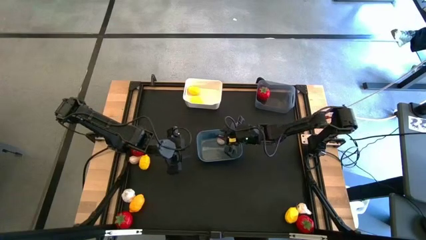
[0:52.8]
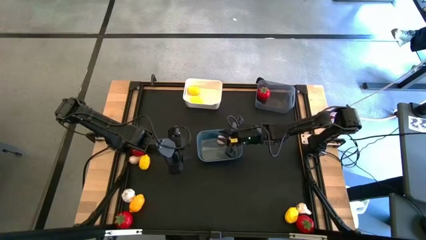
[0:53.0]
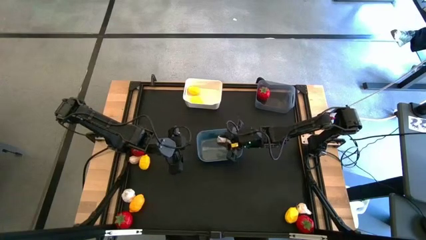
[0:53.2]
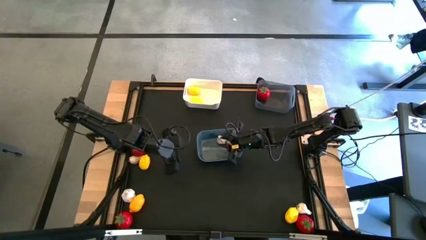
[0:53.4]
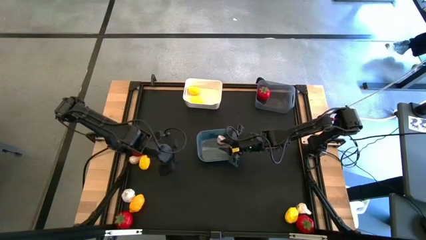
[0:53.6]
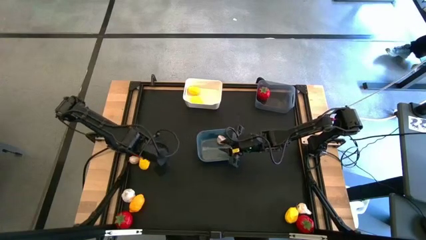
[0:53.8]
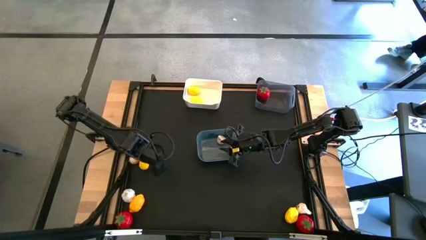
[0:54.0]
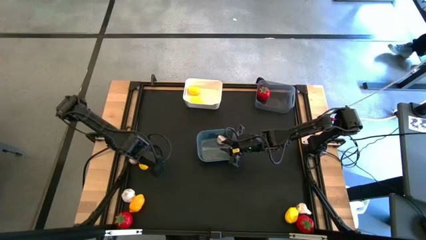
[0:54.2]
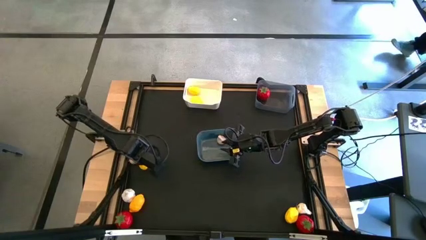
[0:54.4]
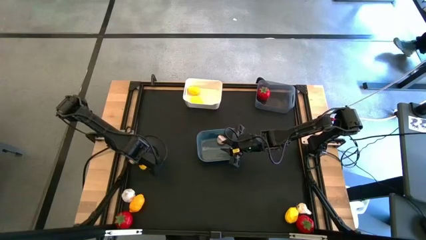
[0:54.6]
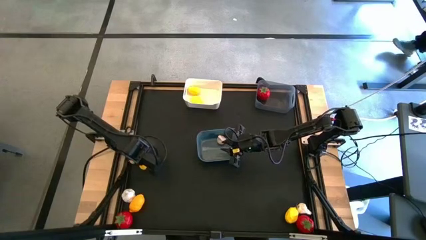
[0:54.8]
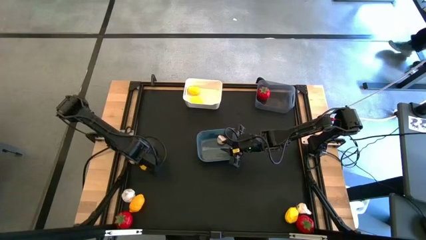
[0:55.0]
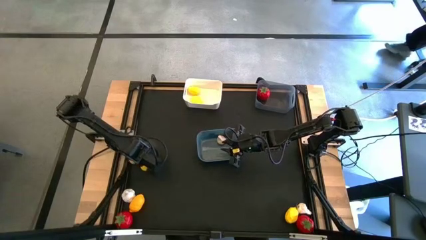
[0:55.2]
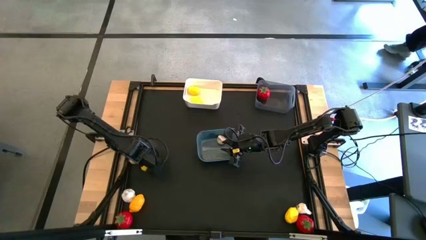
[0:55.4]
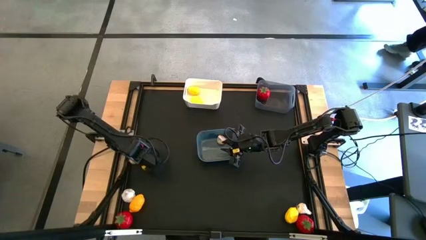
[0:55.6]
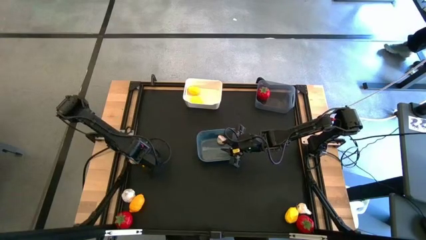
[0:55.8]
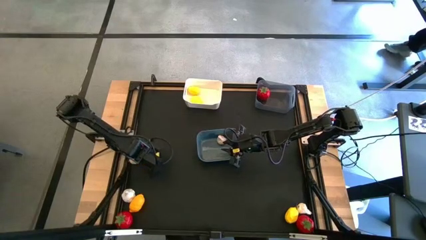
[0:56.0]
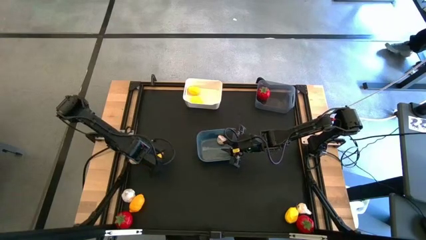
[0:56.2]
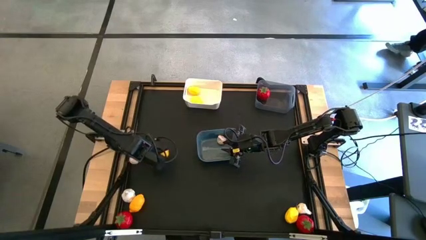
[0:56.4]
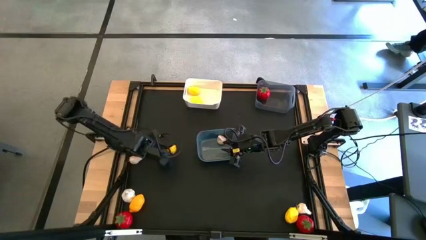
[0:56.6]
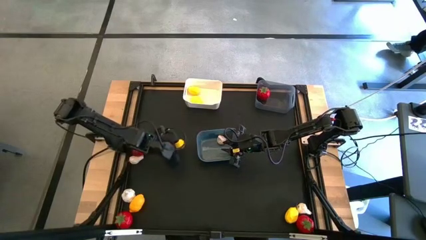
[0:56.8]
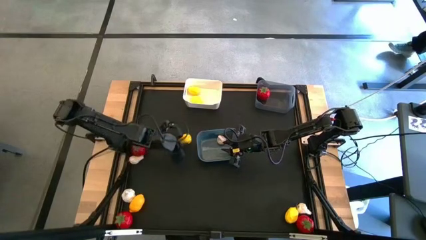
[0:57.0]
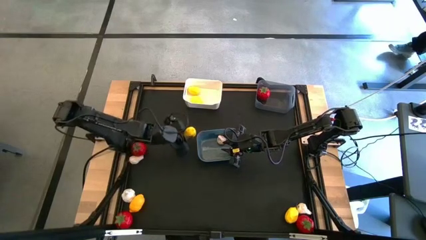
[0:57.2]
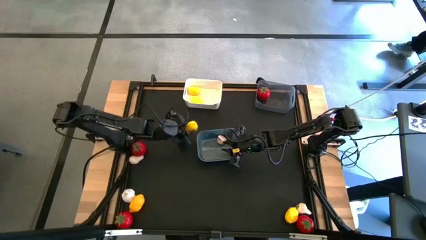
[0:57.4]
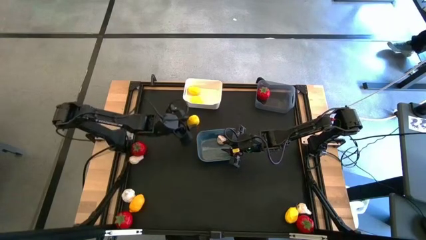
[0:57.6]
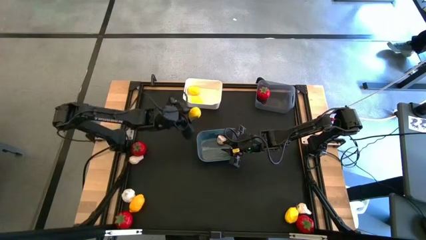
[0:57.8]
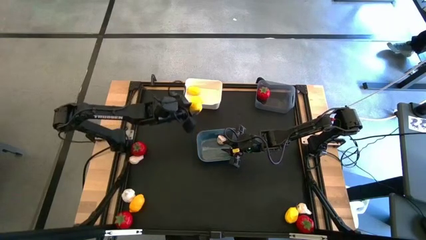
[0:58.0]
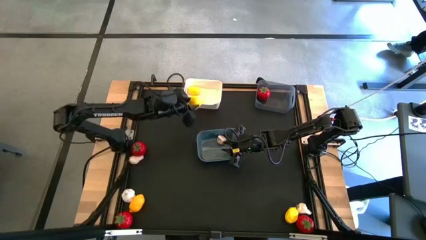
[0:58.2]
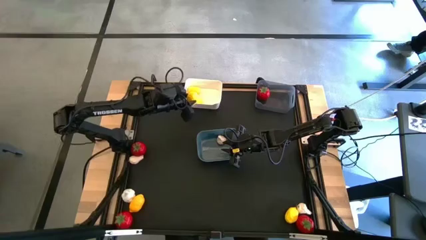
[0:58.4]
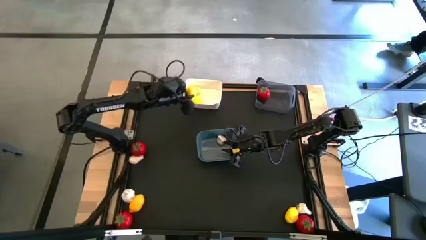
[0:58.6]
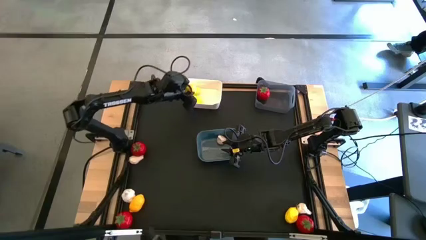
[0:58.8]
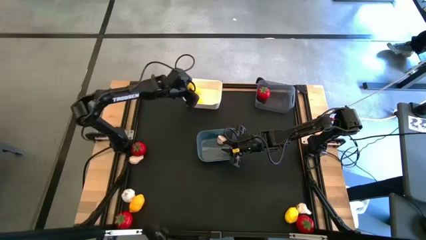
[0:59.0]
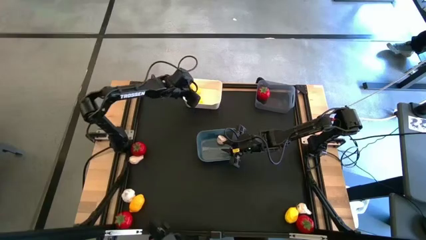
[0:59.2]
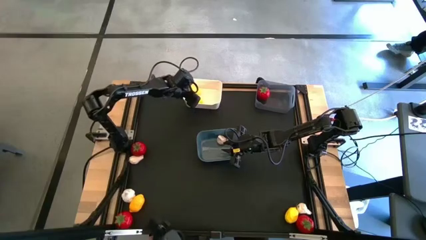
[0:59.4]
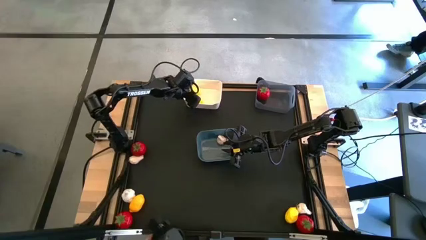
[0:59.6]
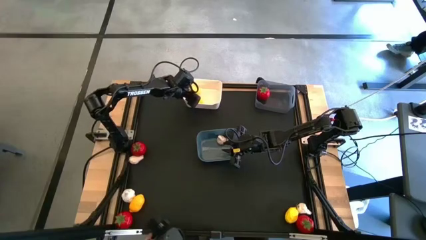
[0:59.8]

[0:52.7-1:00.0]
Task: Sort produce into baskets
Put the yellow lemon into the white bin

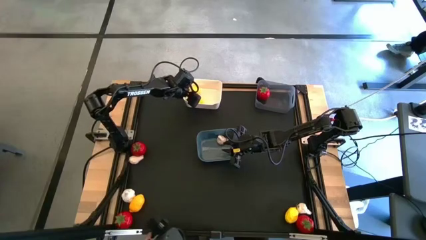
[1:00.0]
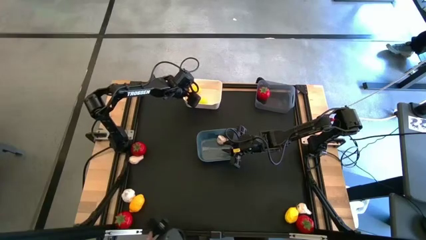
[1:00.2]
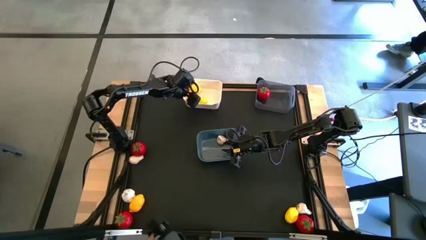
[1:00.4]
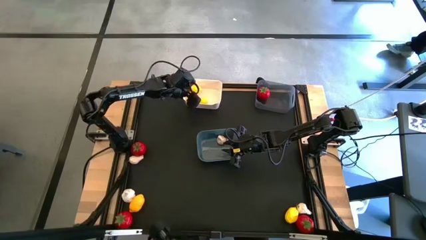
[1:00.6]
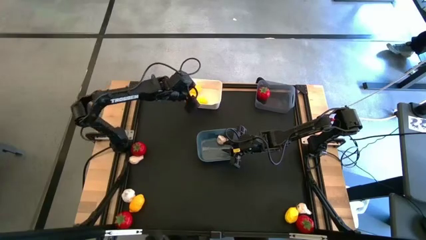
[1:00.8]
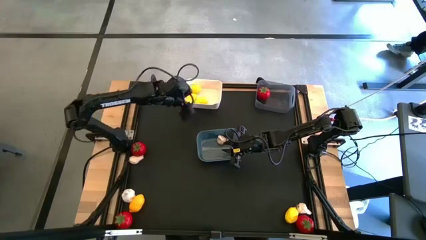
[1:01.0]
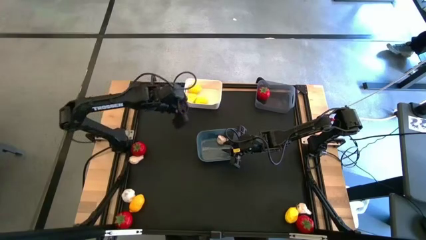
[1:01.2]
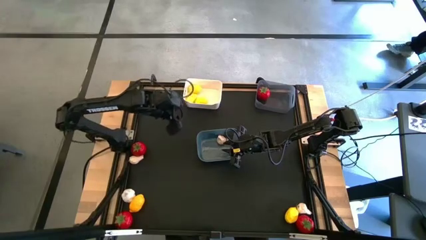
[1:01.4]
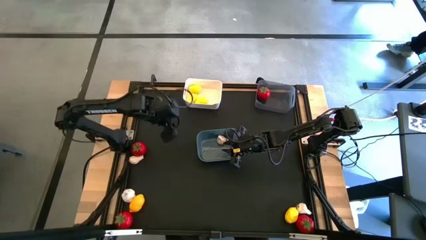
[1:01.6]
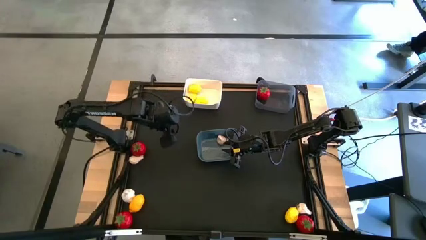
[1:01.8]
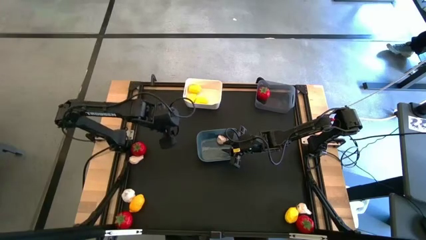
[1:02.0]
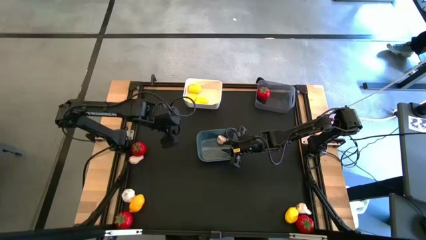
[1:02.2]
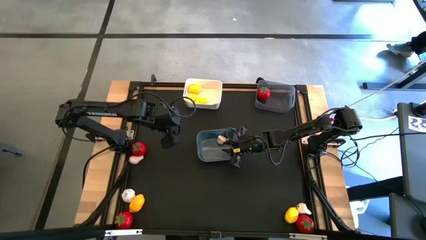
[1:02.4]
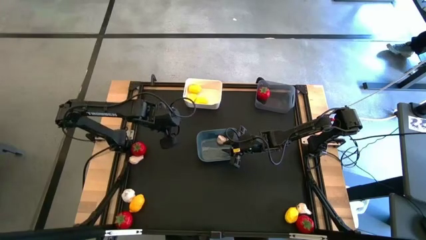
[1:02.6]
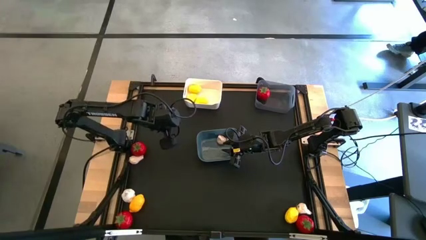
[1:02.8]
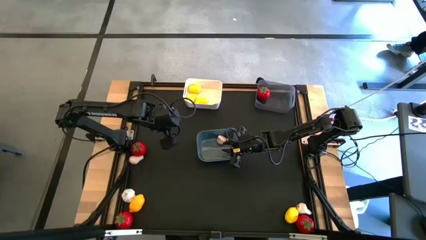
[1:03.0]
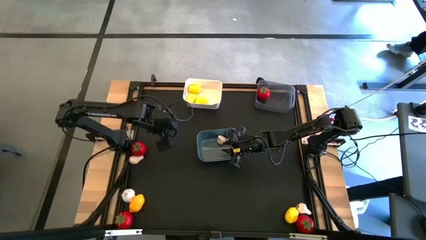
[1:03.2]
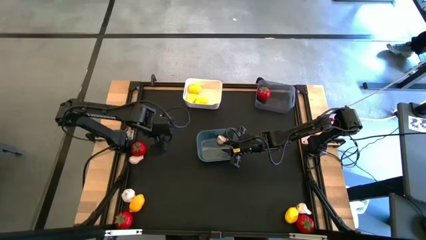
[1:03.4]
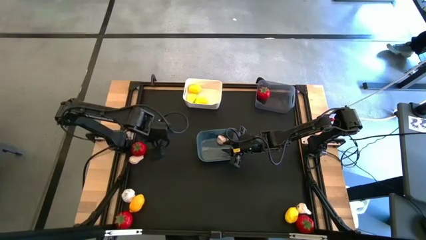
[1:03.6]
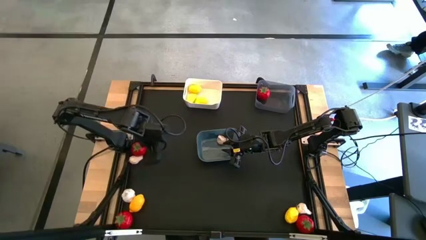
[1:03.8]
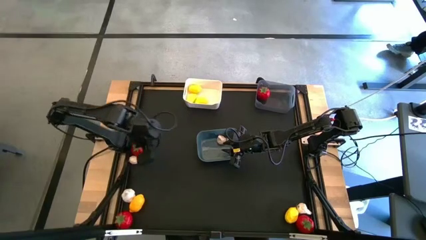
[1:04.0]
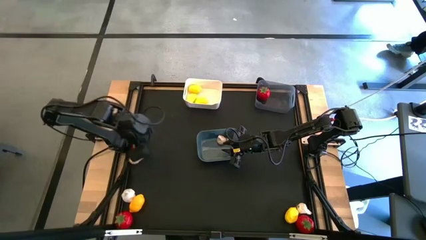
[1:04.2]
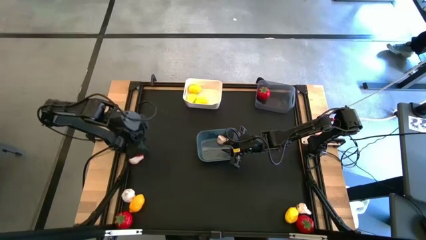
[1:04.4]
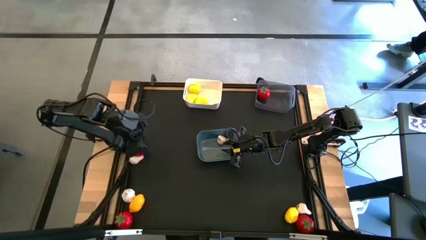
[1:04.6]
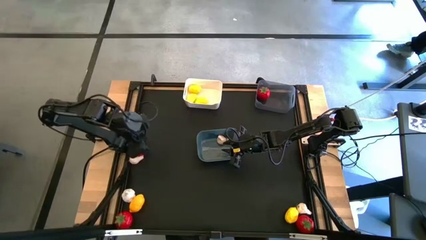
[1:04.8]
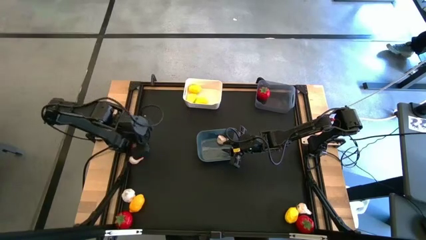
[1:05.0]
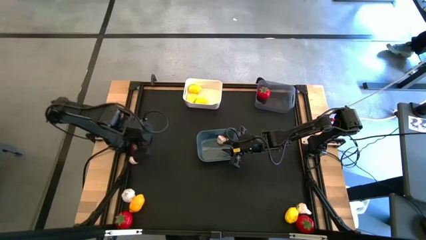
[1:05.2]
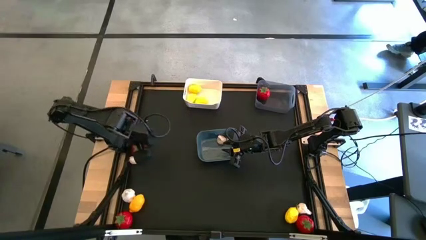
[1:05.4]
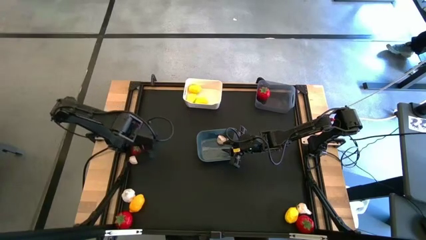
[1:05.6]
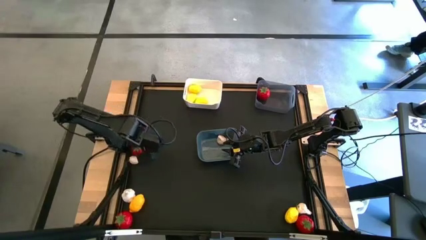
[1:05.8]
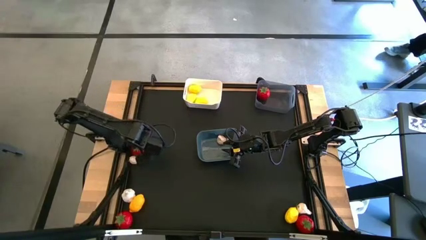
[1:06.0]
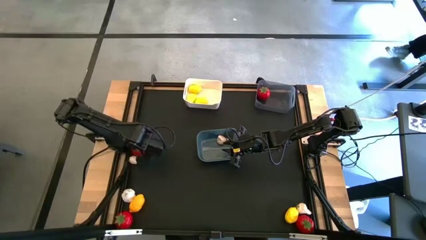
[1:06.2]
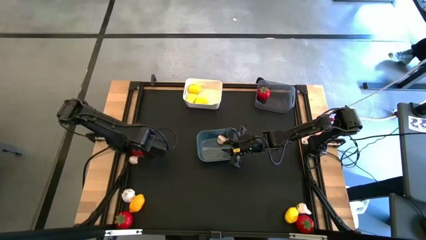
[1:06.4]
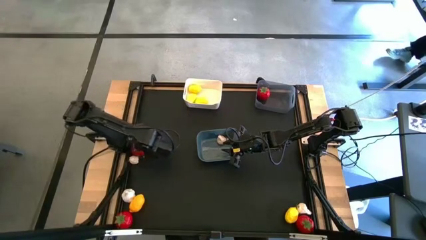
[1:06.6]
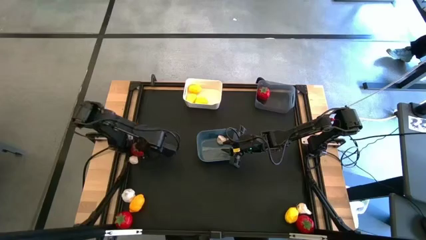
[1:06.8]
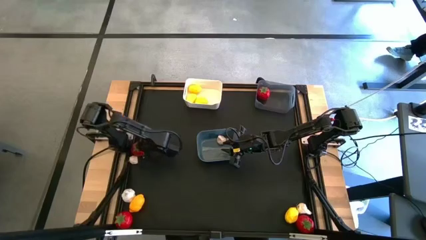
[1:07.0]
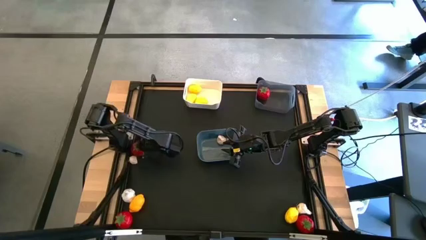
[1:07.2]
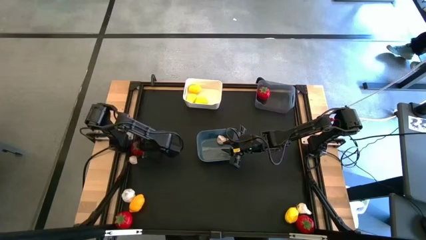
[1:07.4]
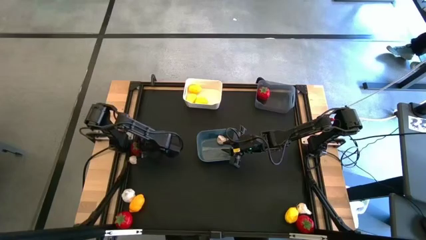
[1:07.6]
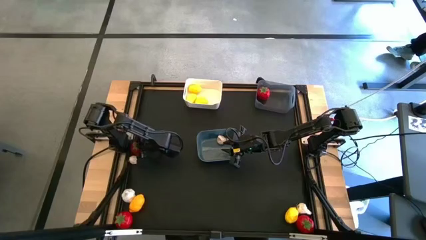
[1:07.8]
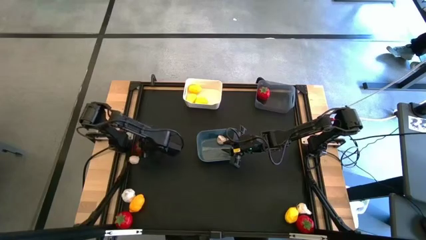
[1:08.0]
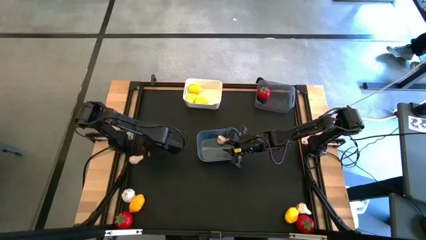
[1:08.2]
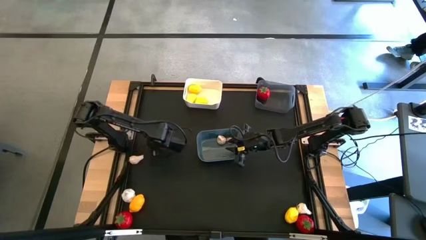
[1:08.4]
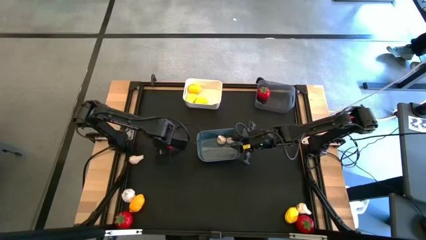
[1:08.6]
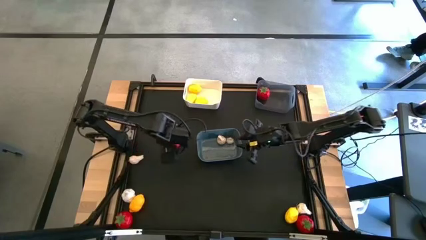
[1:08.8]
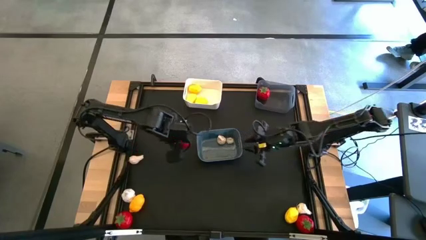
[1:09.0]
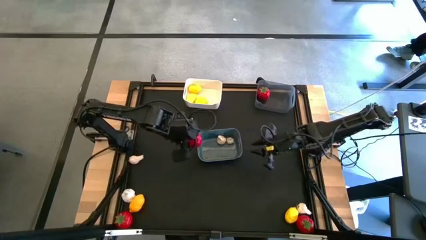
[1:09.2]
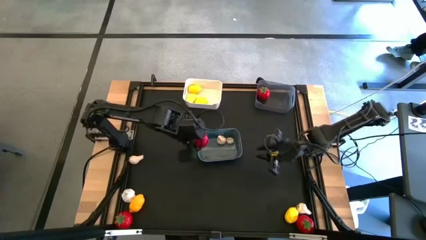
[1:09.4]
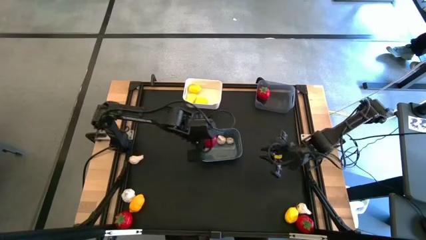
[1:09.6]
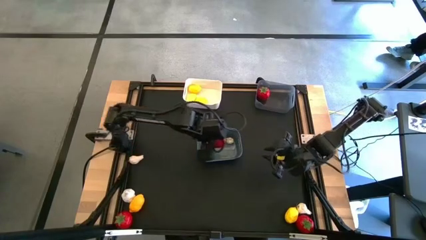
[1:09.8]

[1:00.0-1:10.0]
Put the red tomato into the black bin
